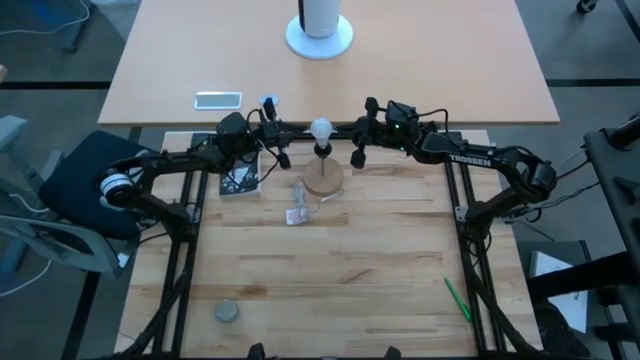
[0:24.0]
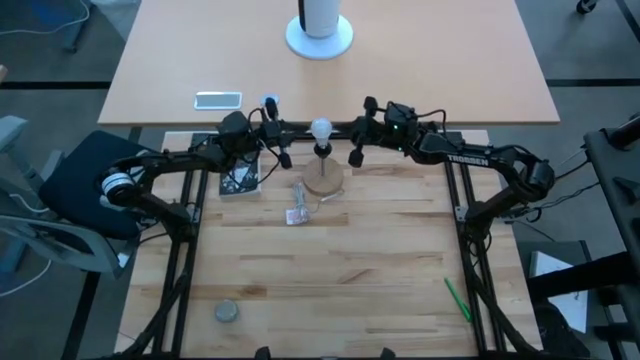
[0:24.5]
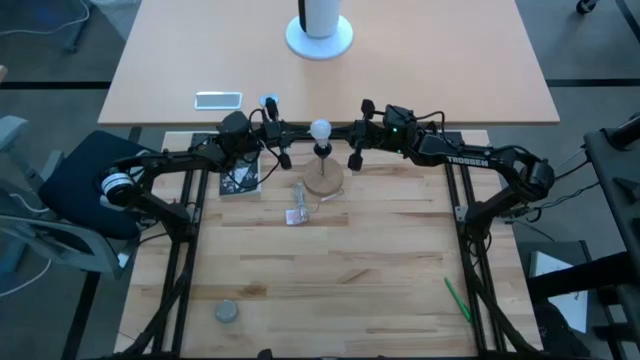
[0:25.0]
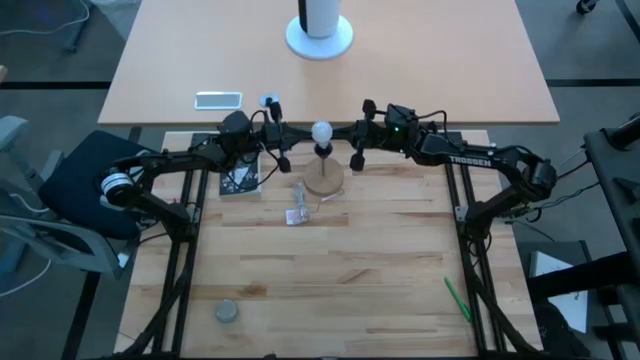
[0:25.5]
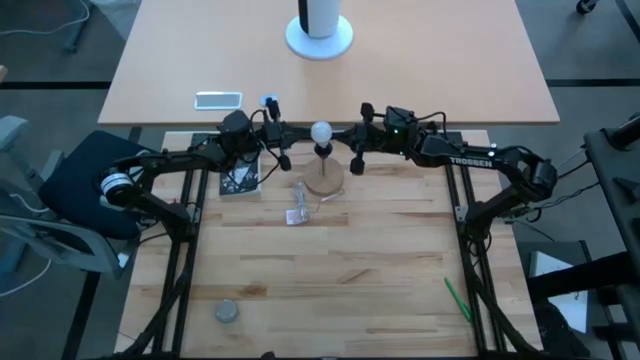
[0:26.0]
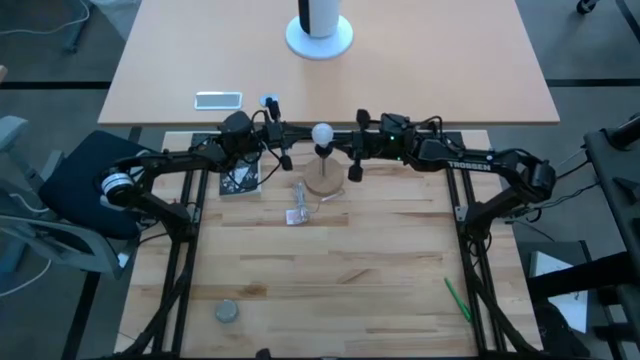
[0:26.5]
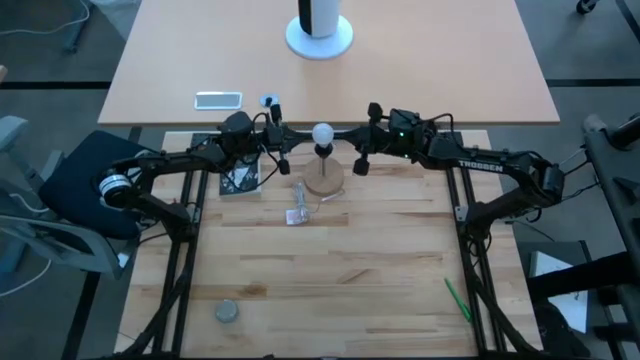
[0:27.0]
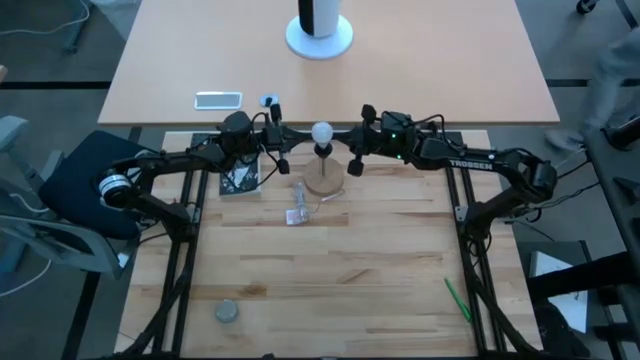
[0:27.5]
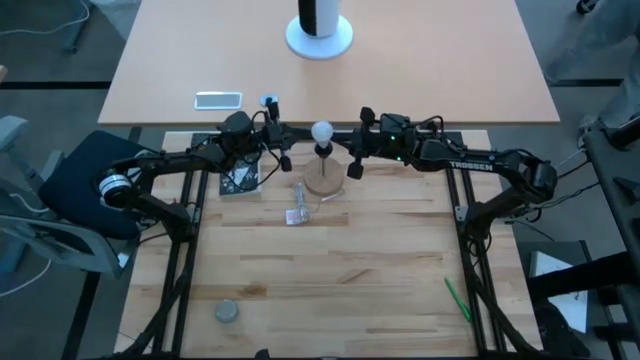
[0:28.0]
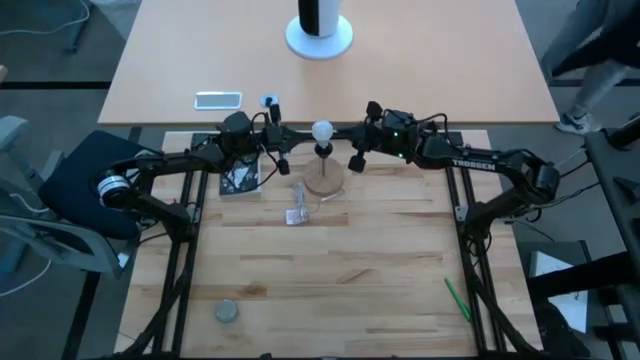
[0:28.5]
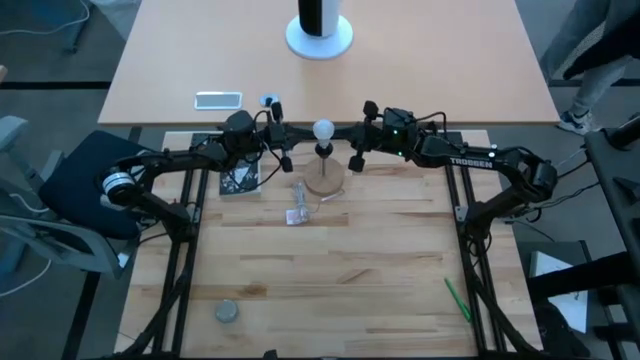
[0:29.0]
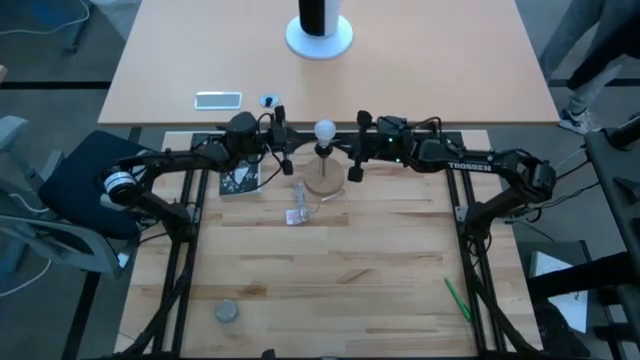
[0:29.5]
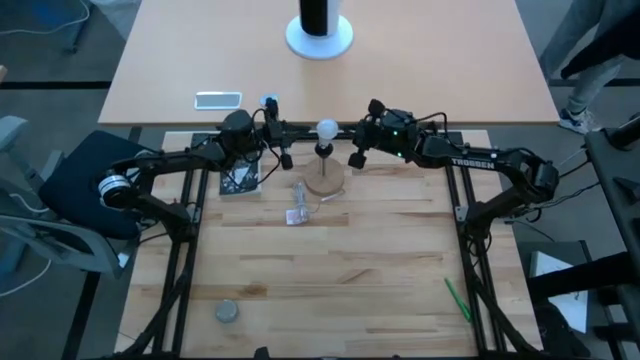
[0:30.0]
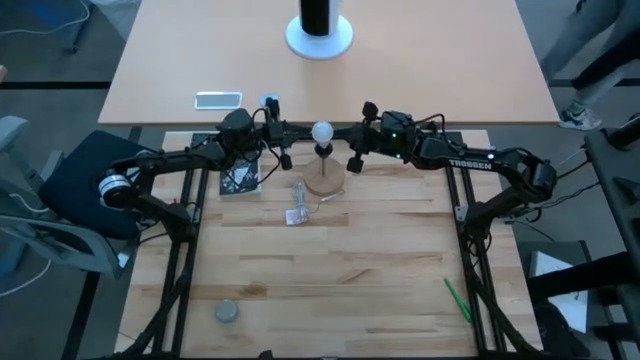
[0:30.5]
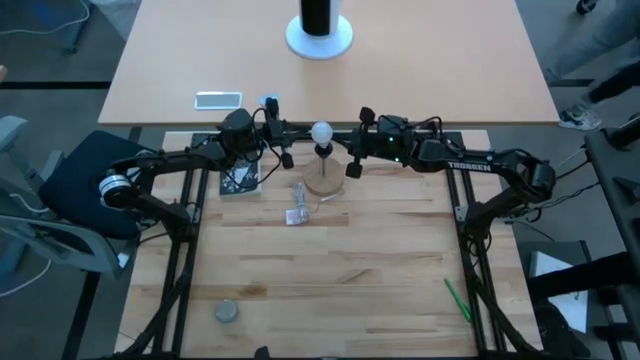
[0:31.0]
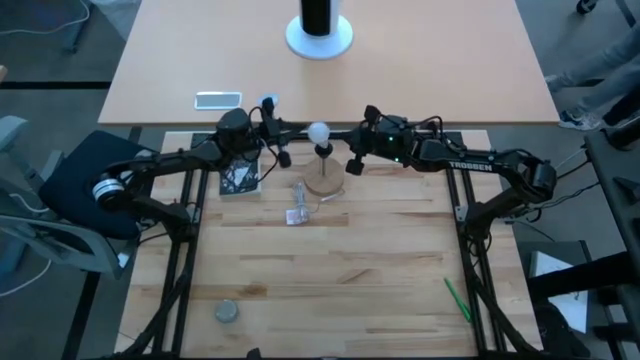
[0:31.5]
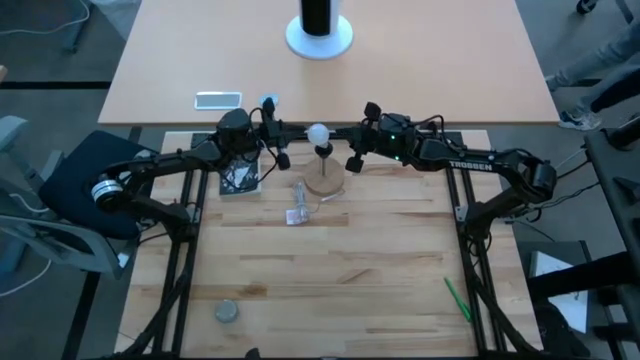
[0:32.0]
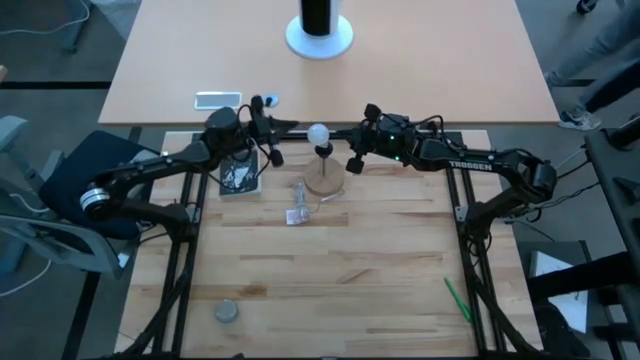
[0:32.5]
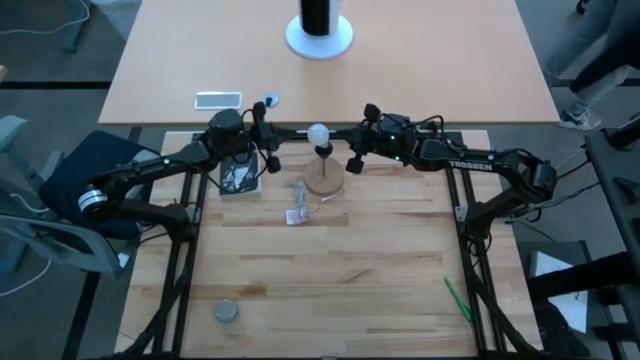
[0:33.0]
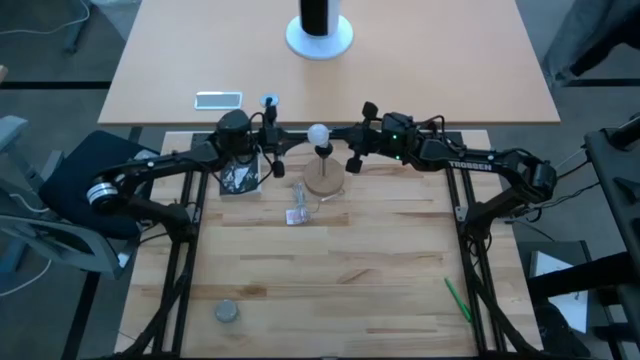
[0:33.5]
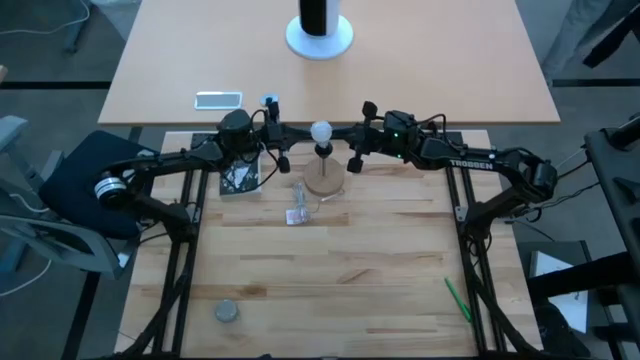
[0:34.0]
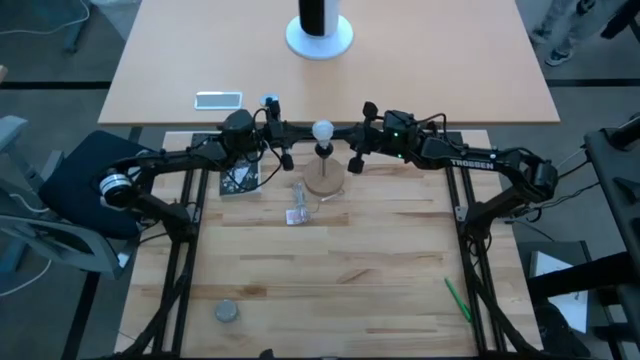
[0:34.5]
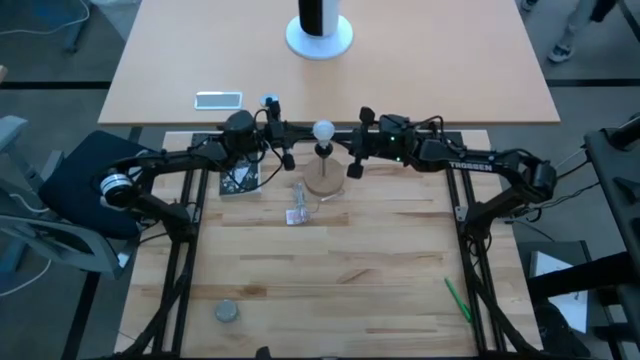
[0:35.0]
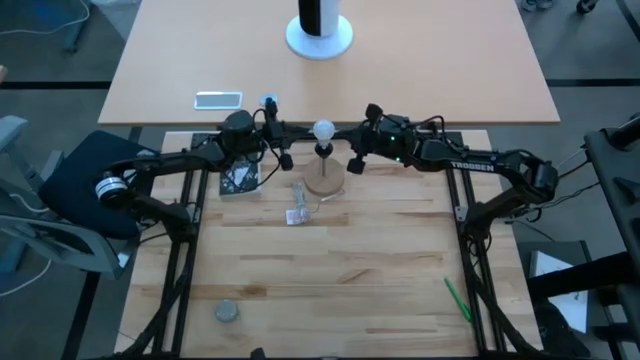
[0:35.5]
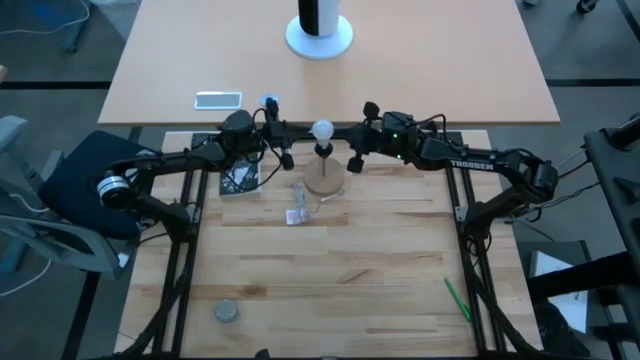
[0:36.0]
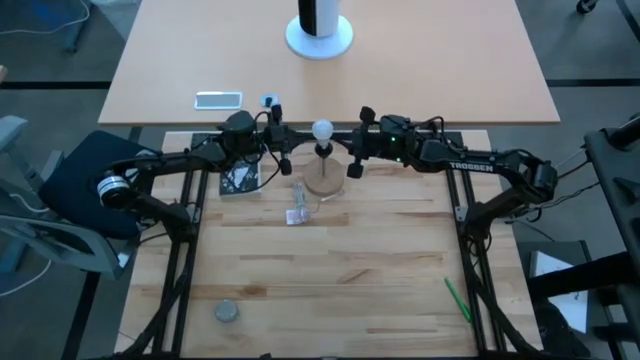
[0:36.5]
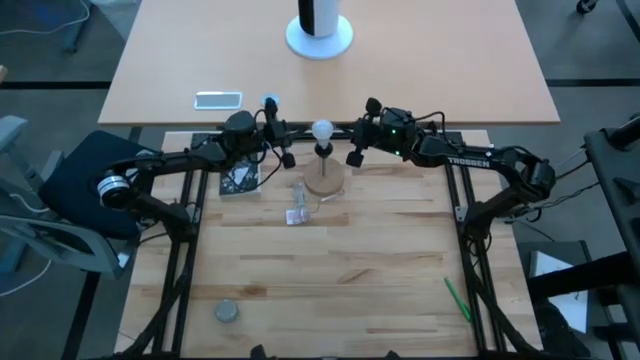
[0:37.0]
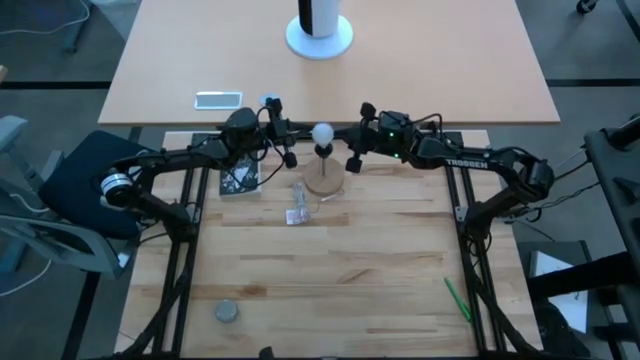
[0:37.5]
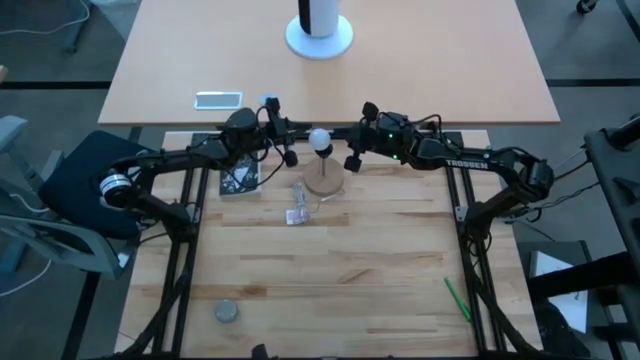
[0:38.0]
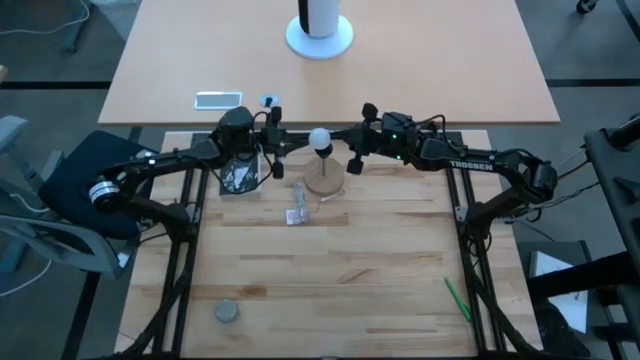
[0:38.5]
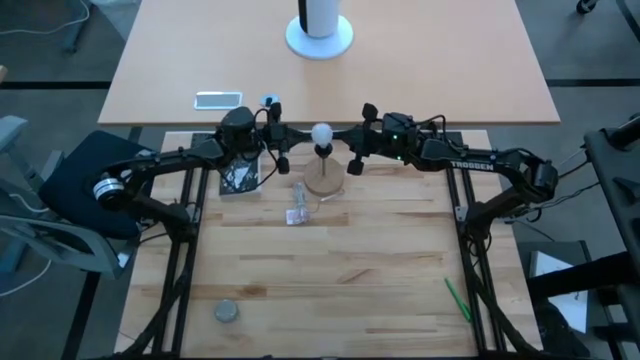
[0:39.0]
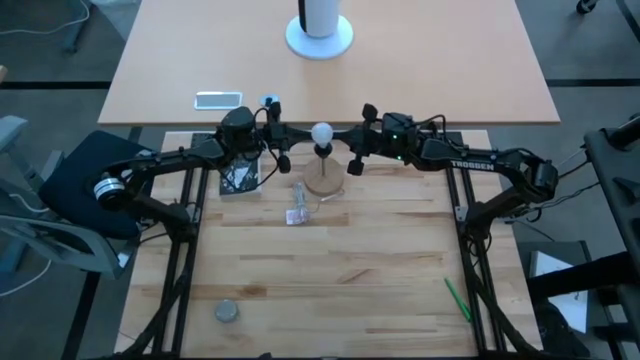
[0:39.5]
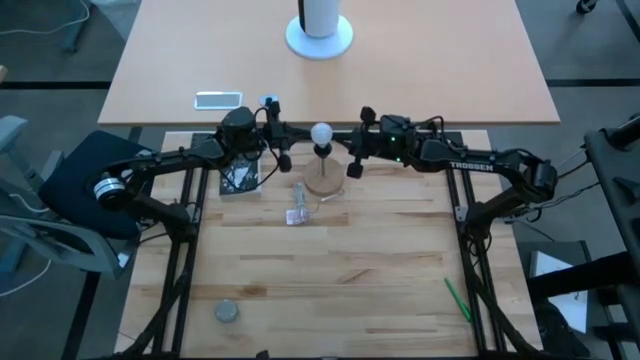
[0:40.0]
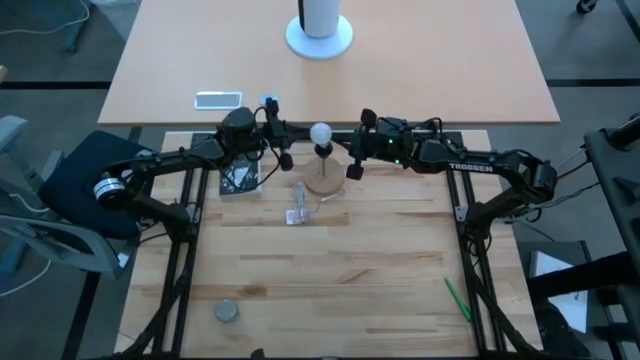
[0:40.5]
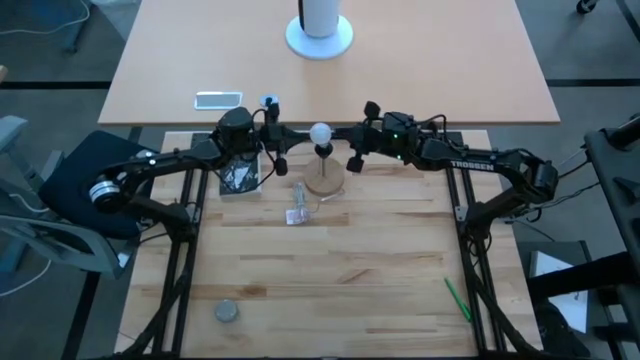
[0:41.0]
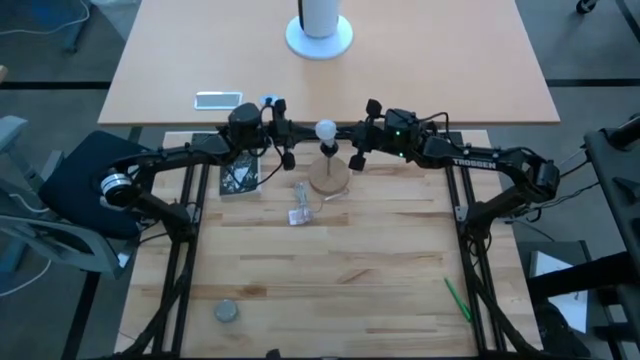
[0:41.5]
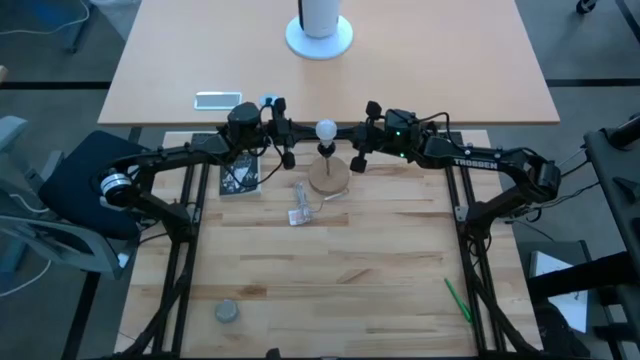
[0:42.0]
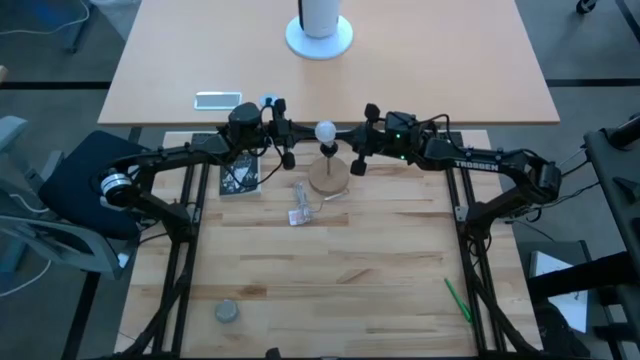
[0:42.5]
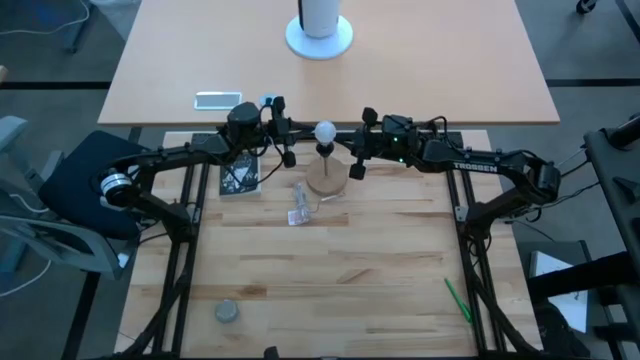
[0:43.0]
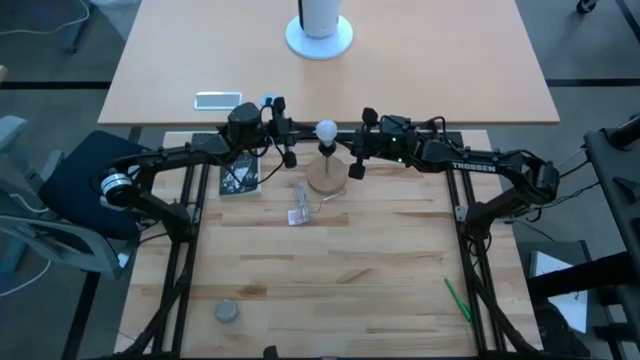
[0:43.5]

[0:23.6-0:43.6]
Task: Screw lightbulb
Insert the lightbulb into the black lamp
